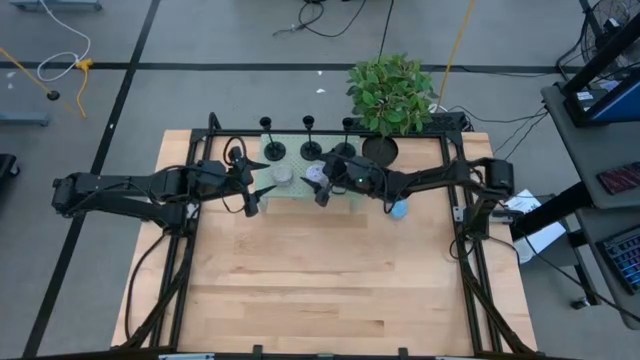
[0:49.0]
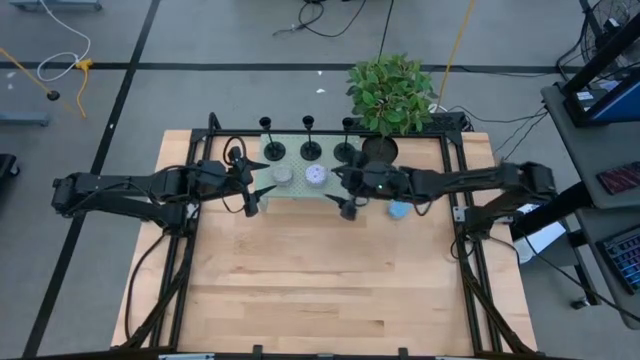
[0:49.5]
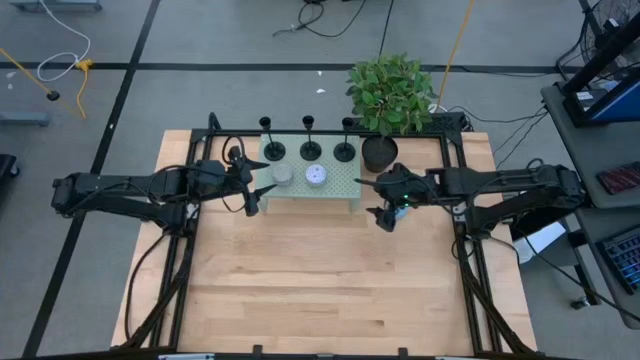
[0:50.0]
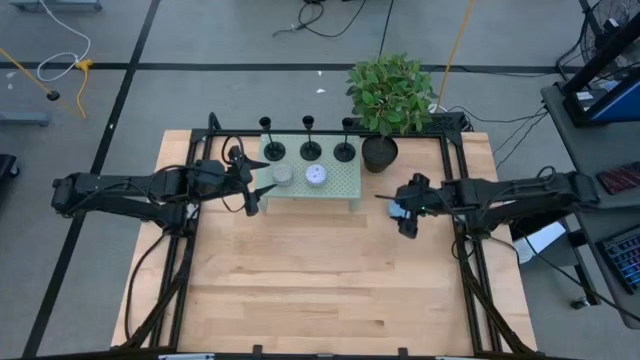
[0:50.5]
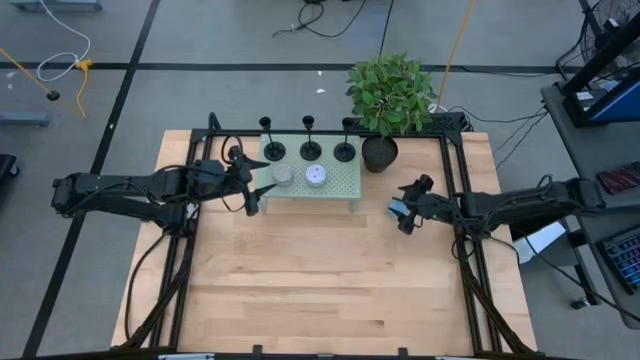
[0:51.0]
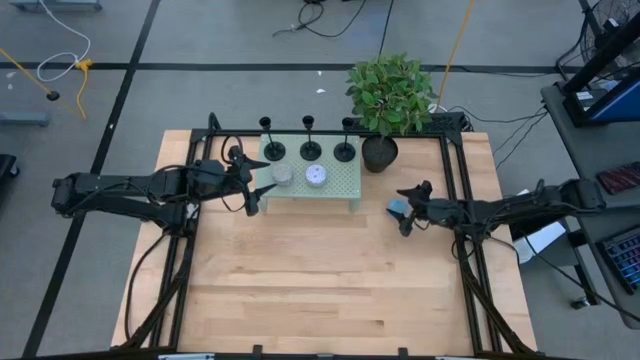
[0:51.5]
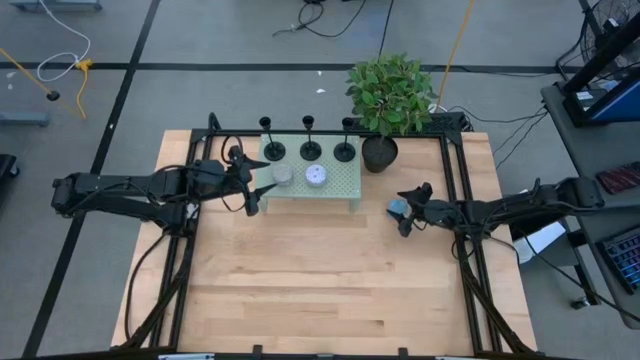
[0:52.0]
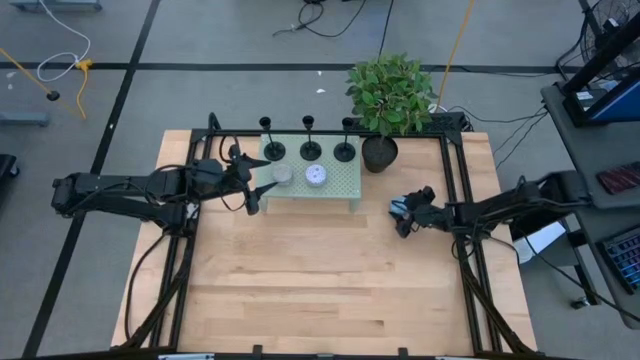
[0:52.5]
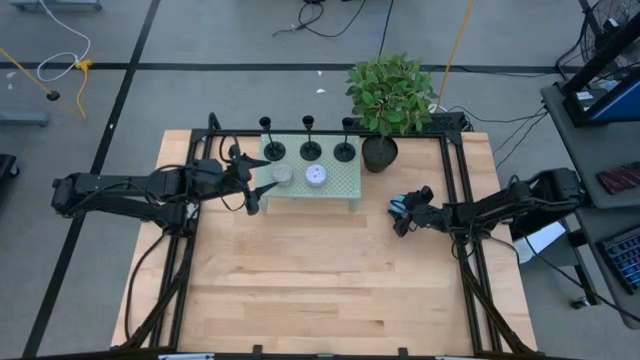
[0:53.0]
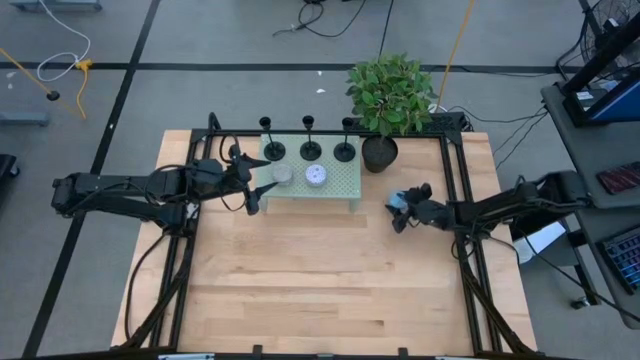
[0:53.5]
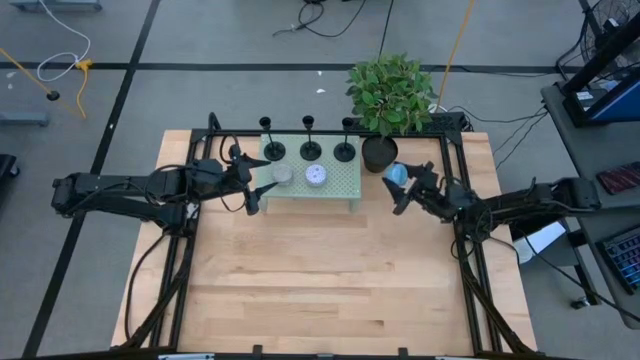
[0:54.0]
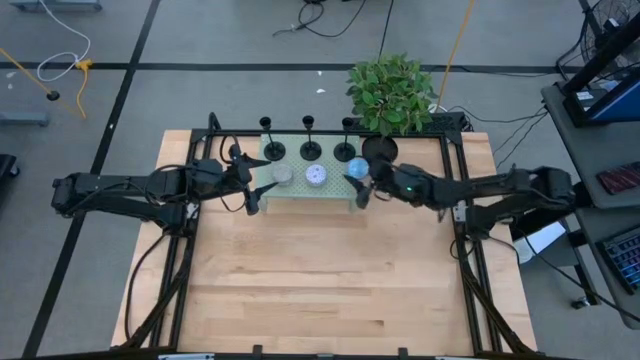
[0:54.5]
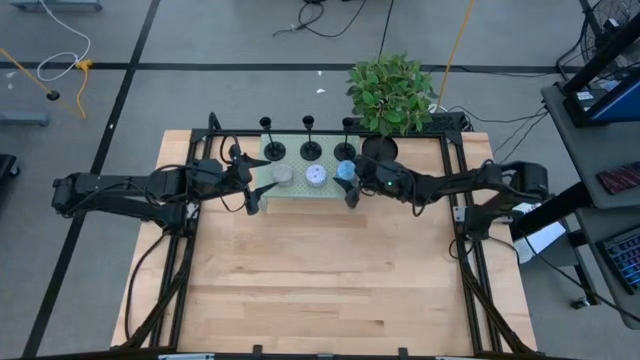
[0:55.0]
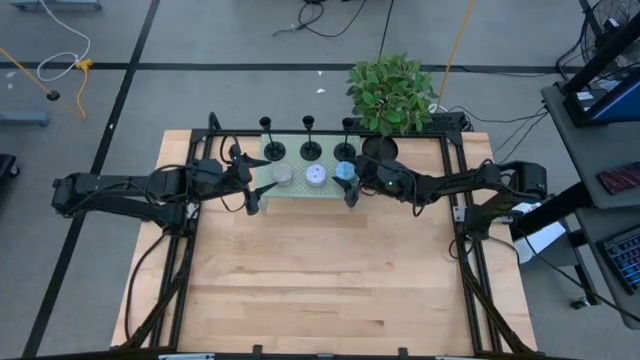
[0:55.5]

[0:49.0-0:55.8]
Task: Pick & Place candle stick holders
Put the blue scented candle on the shelf

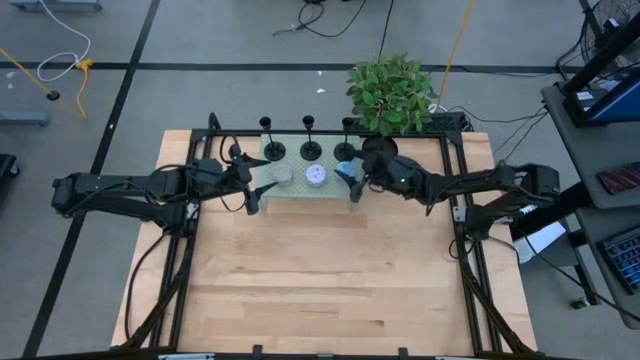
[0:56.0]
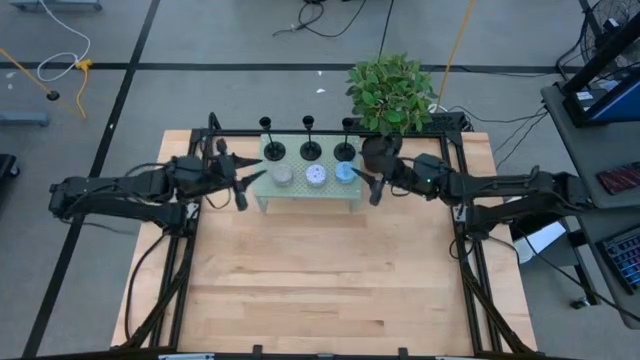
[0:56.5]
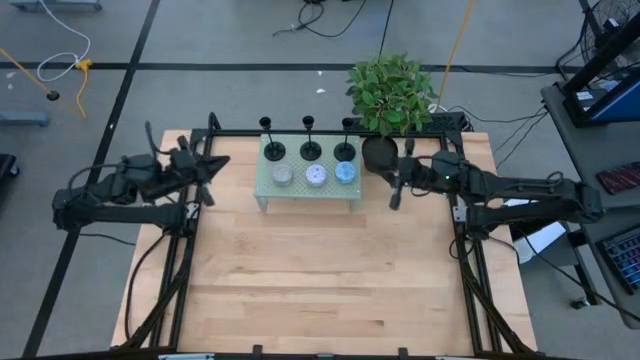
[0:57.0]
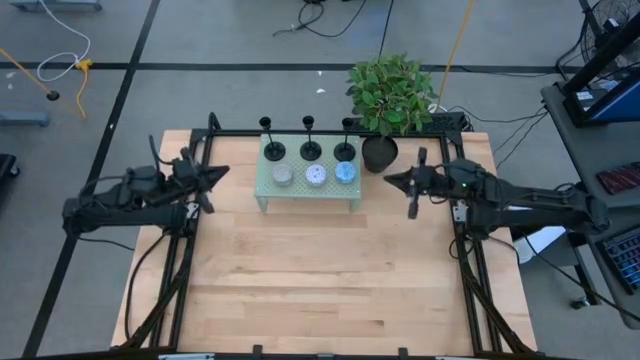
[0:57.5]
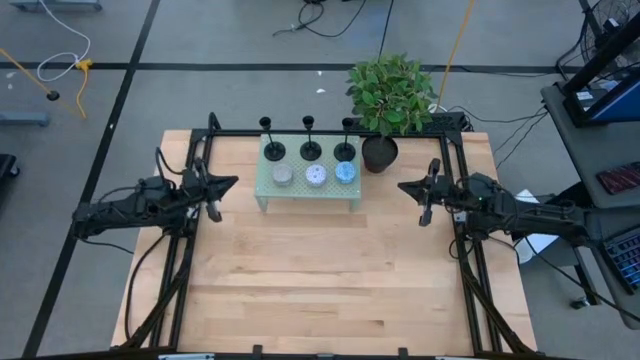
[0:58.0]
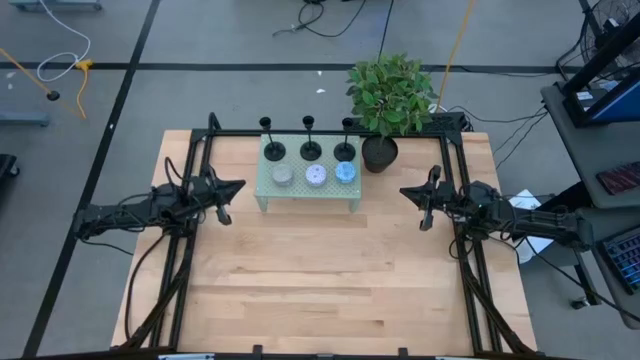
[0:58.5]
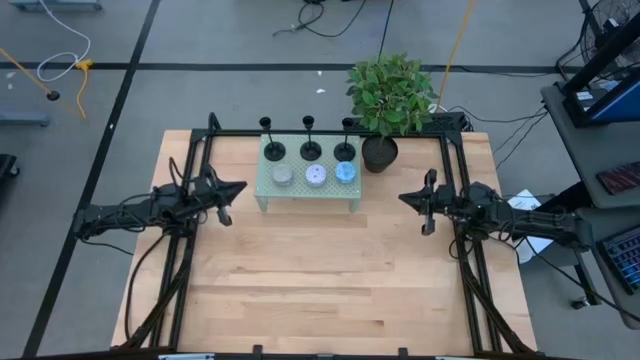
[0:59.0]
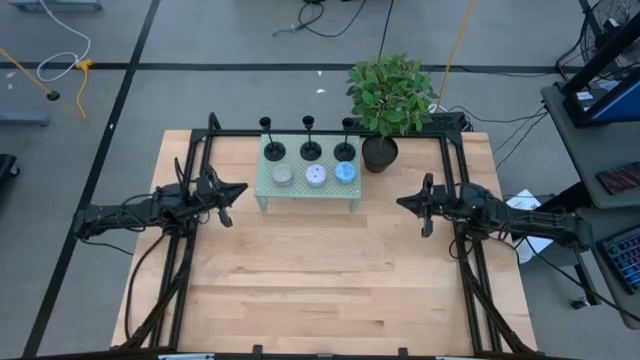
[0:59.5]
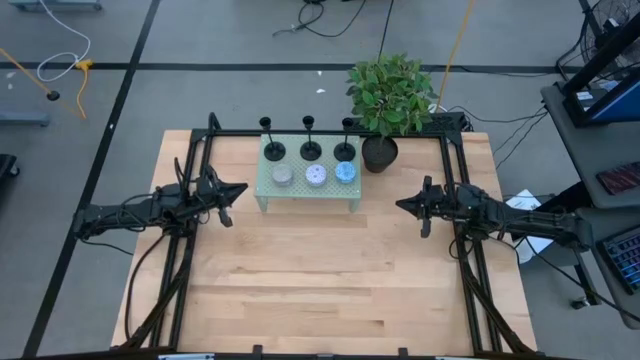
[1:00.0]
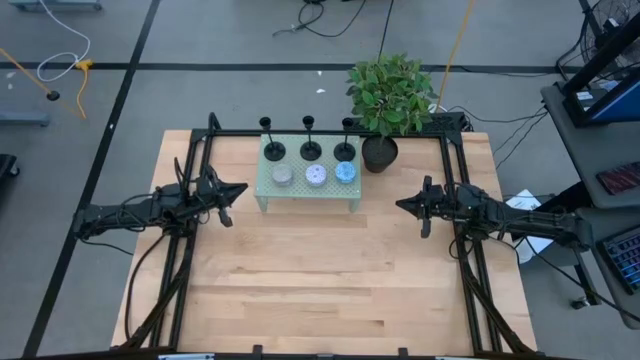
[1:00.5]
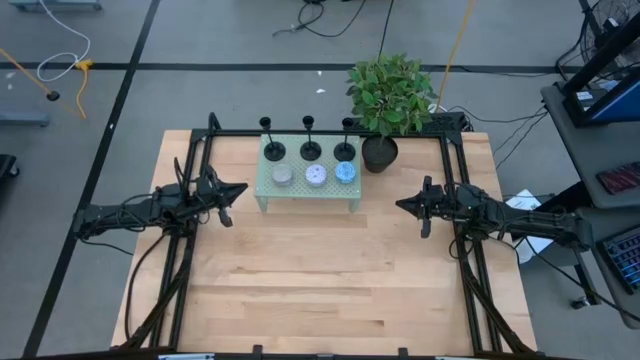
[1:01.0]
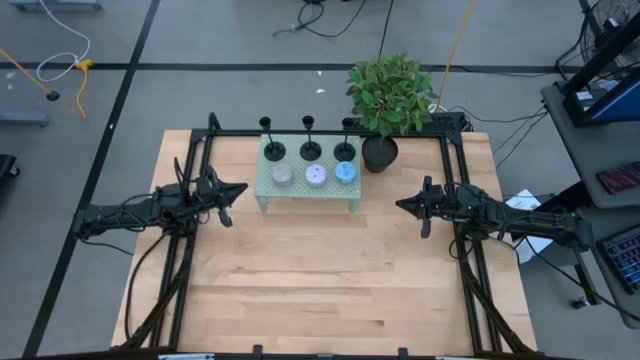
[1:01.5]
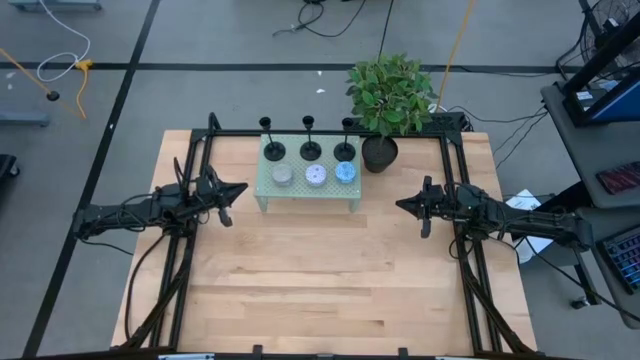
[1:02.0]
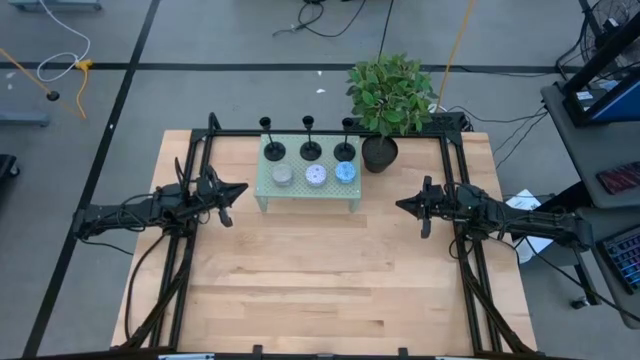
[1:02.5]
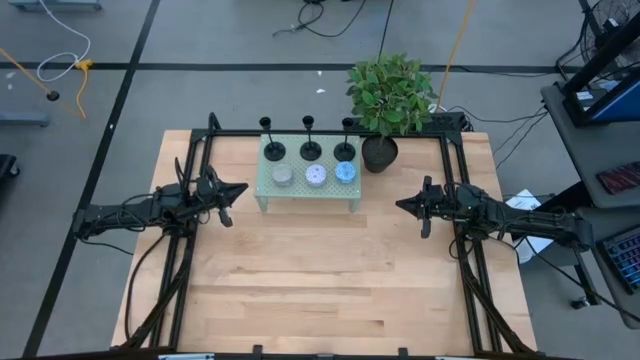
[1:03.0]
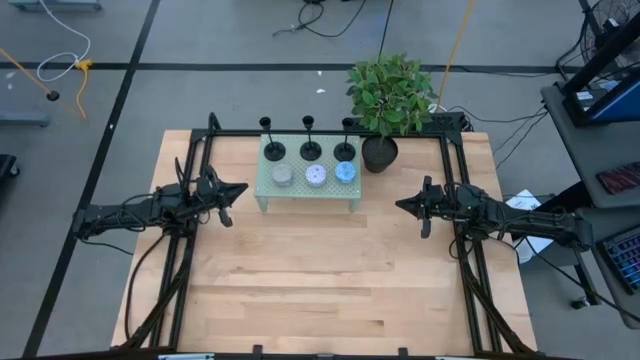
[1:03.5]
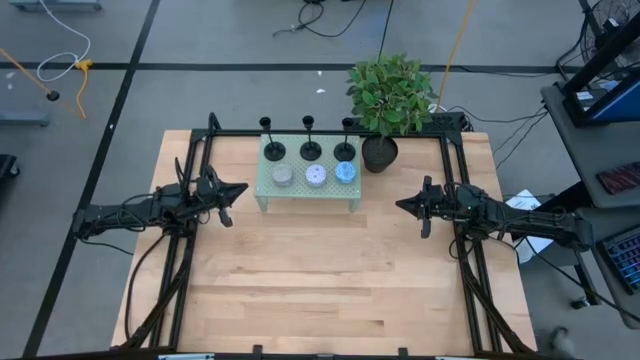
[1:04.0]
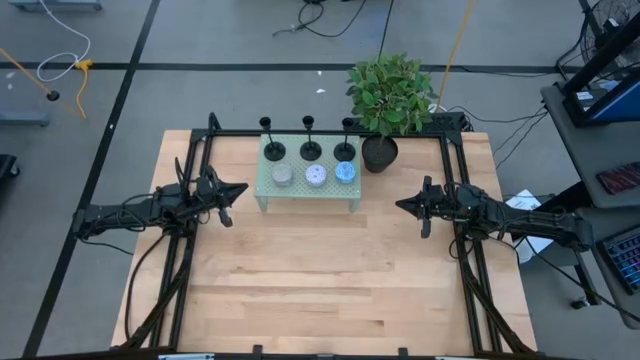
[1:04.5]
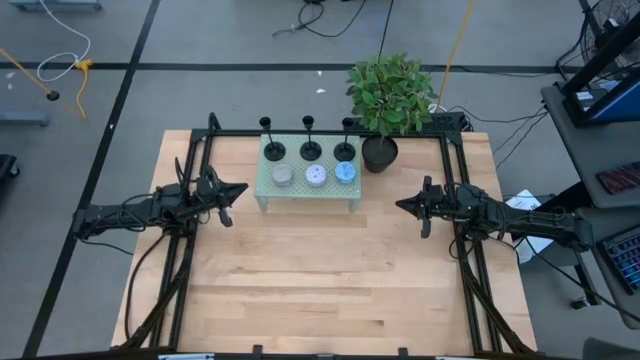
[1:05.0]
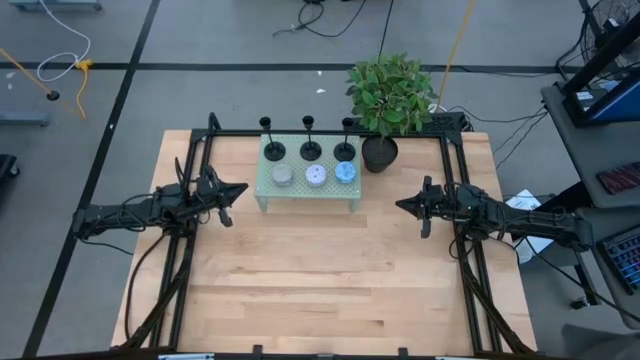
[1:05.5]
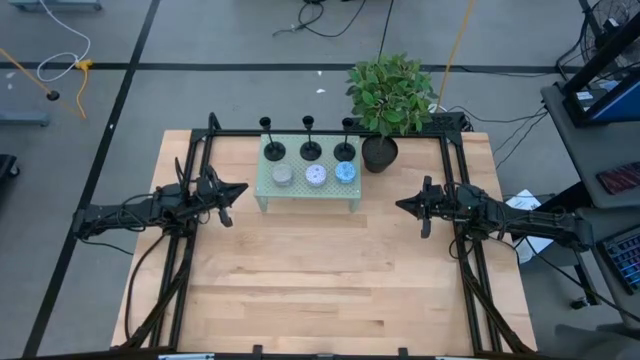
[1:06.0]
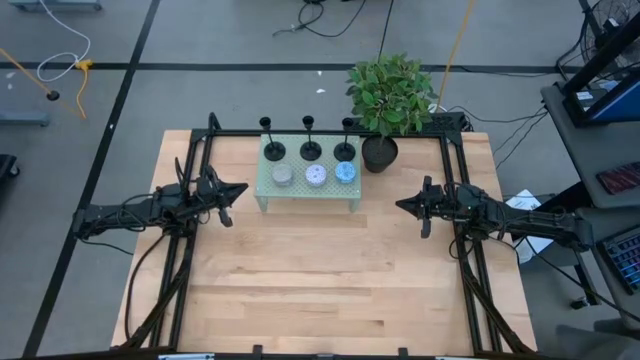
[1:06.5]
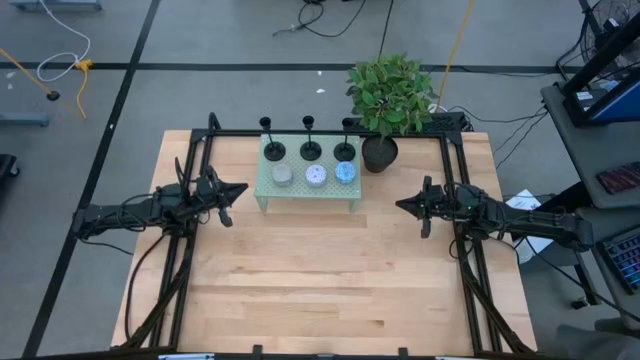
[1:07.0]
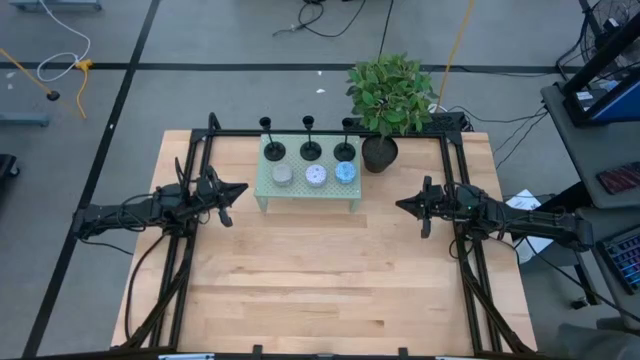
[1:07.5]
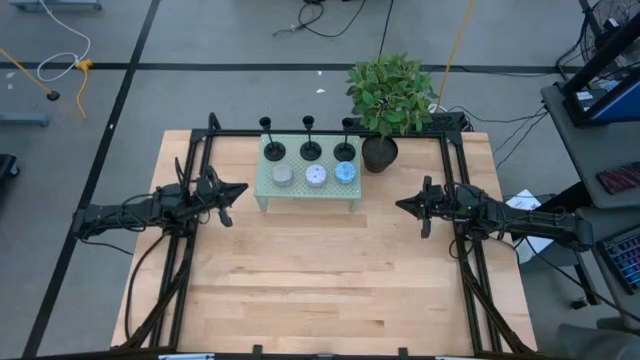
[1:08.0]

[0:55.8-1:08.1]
Return to Home Position

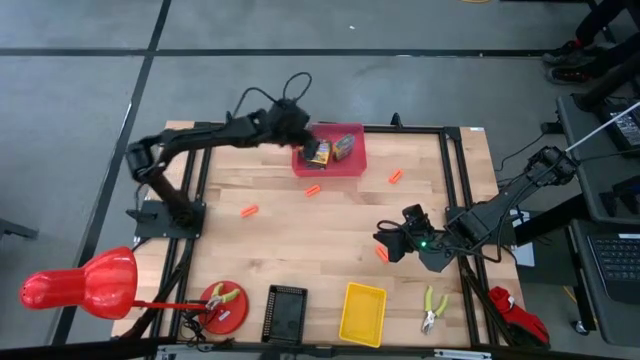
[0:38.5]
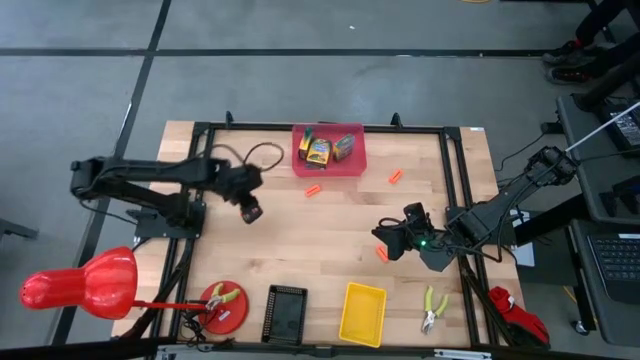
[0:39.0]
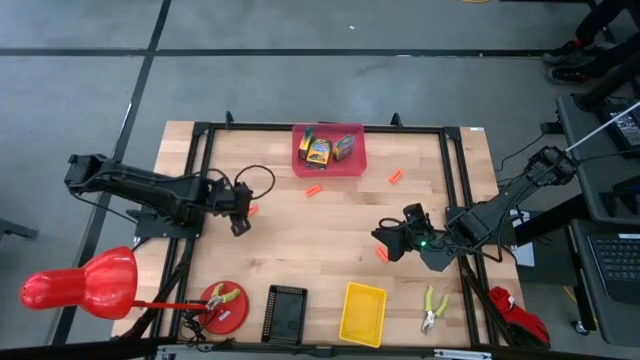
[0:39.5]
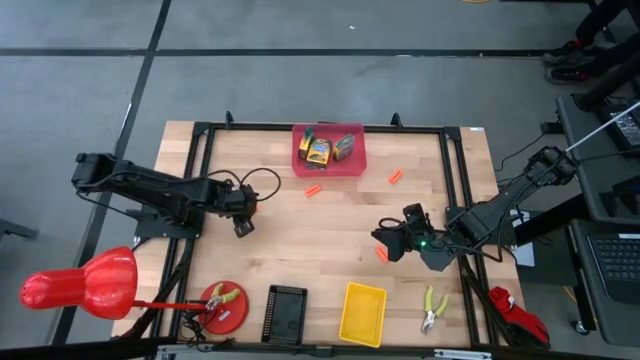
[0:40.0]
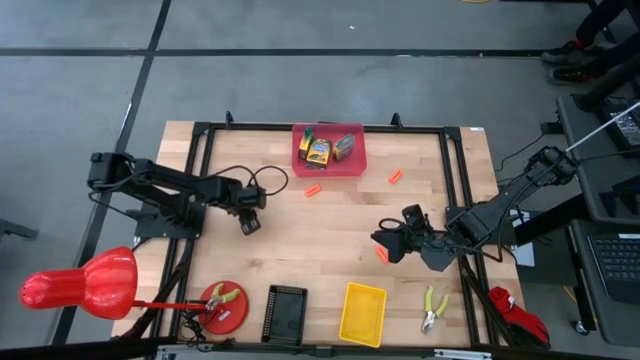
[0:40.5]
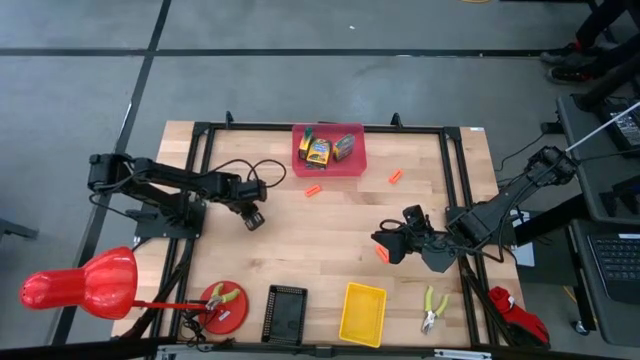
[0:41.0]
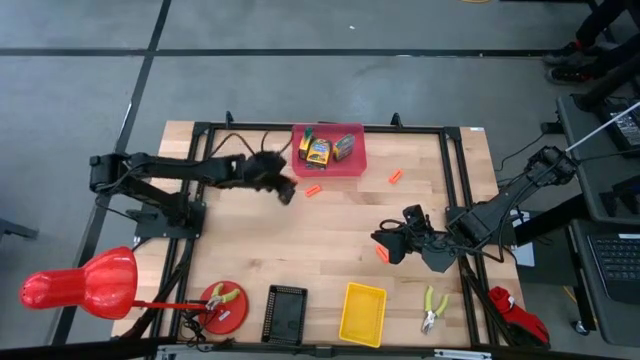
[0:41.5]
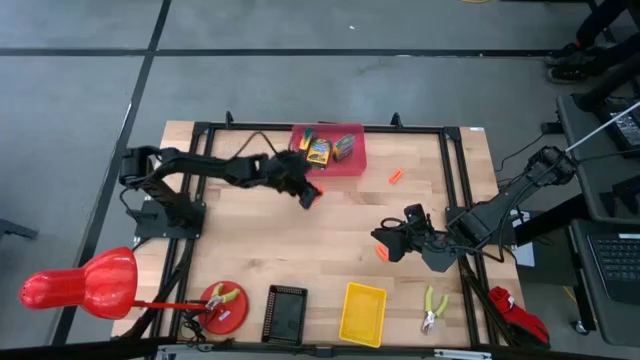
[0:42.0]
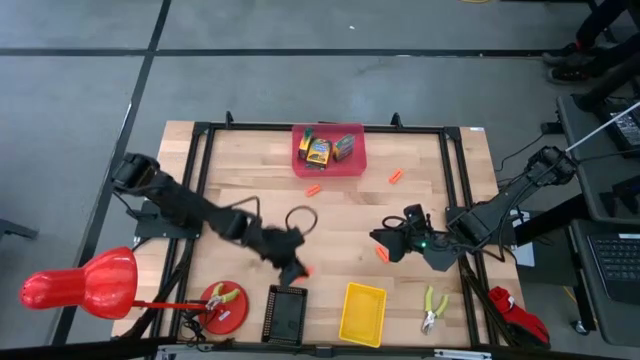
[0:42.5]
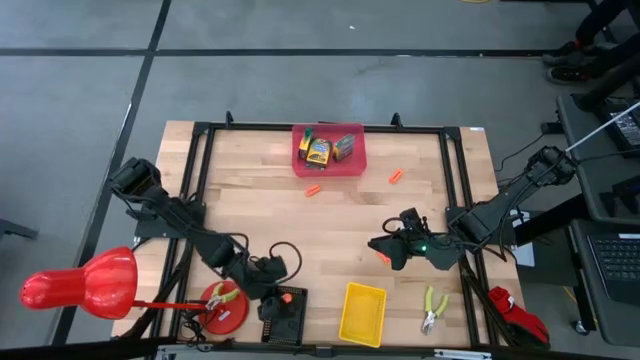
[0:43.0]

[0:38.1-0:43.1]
Task: Pick & Place School Supplies
Put the orange eraser into the black bin
